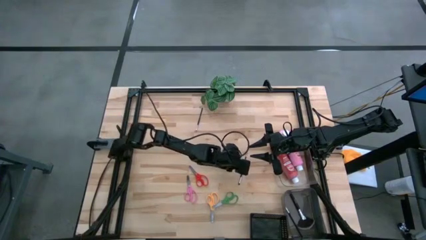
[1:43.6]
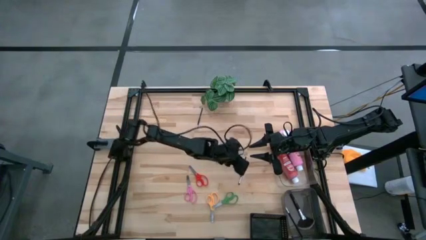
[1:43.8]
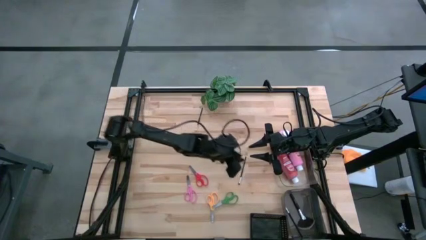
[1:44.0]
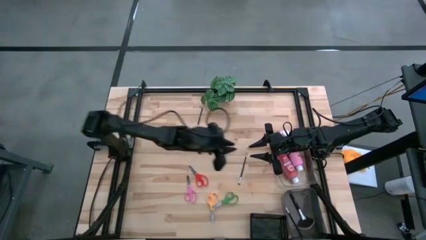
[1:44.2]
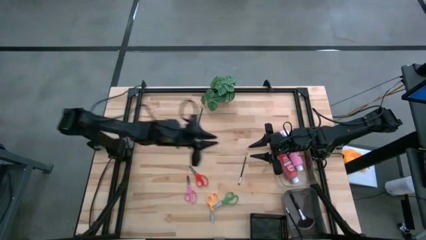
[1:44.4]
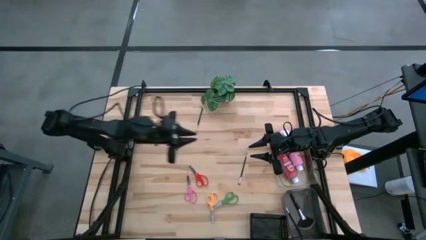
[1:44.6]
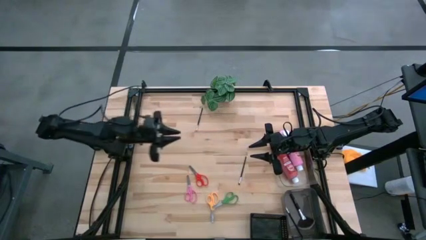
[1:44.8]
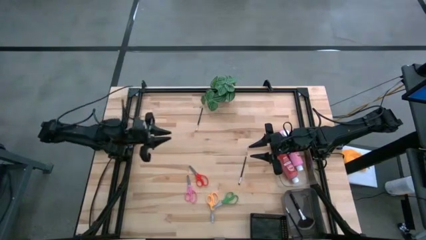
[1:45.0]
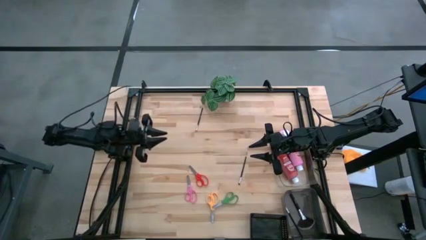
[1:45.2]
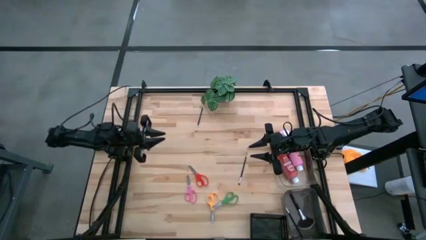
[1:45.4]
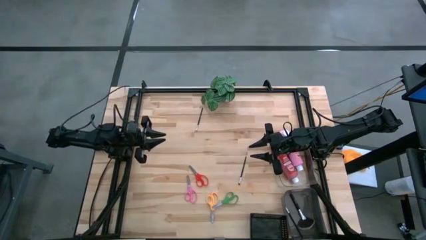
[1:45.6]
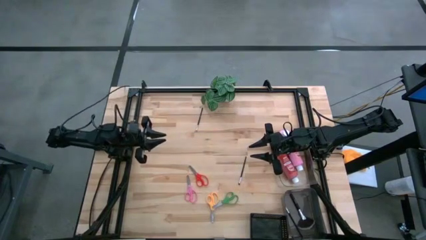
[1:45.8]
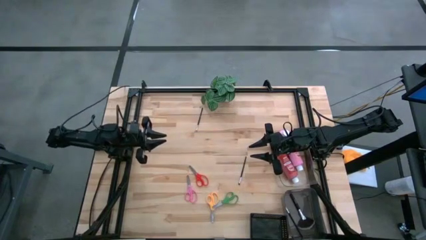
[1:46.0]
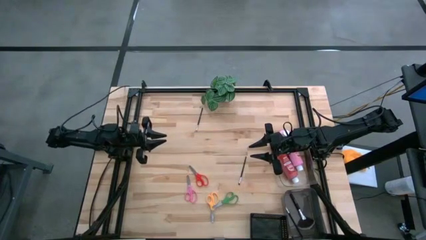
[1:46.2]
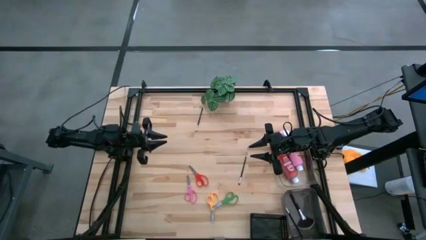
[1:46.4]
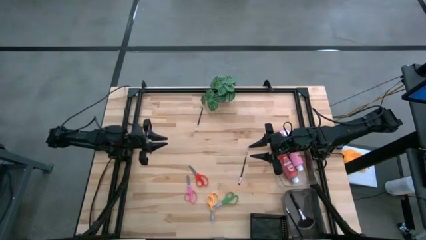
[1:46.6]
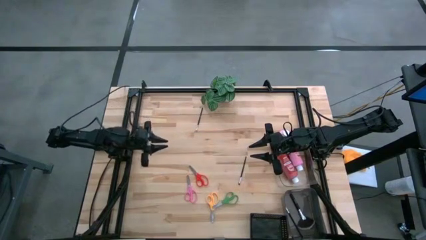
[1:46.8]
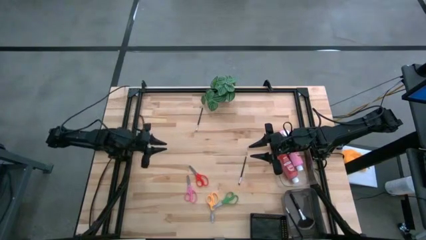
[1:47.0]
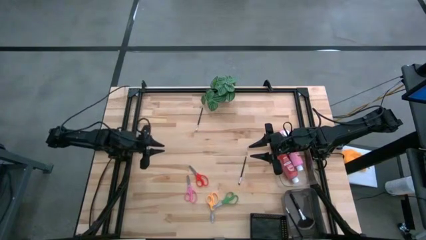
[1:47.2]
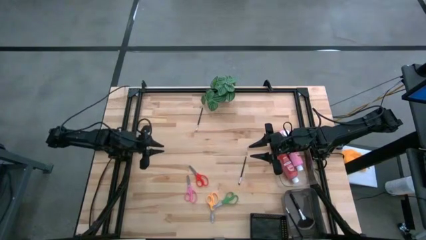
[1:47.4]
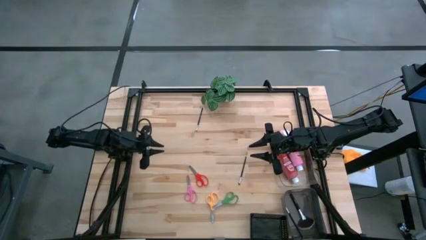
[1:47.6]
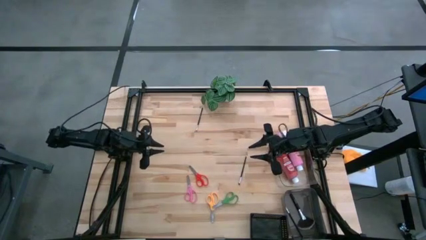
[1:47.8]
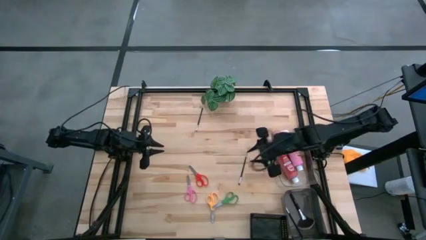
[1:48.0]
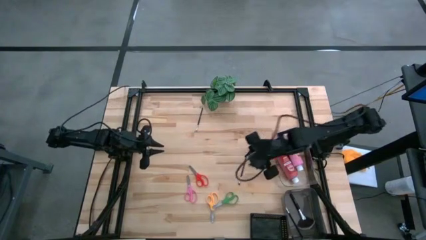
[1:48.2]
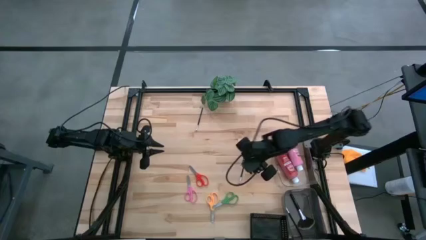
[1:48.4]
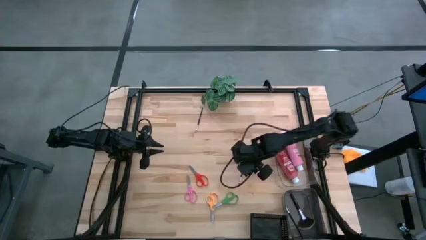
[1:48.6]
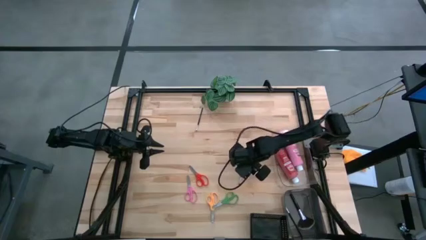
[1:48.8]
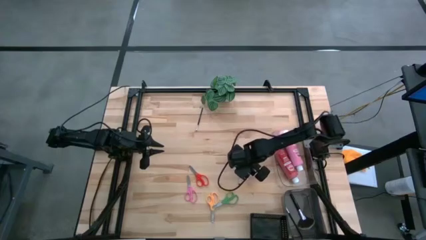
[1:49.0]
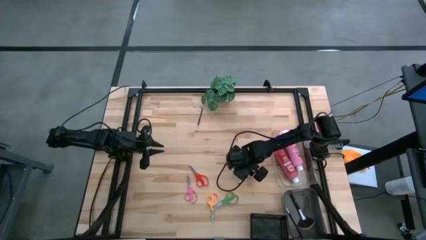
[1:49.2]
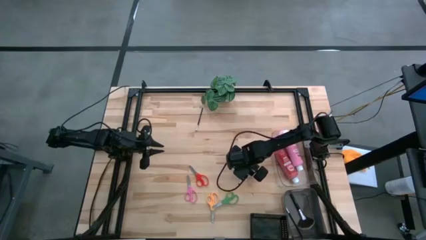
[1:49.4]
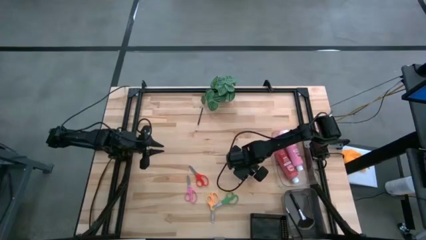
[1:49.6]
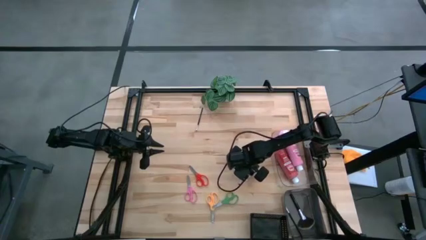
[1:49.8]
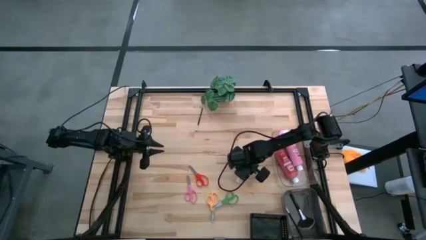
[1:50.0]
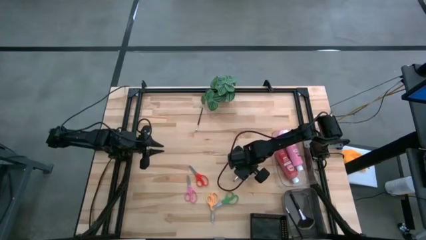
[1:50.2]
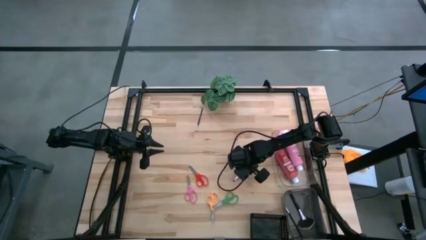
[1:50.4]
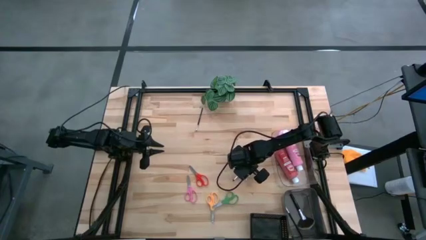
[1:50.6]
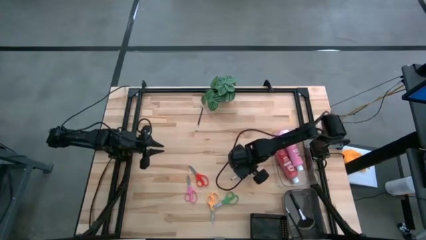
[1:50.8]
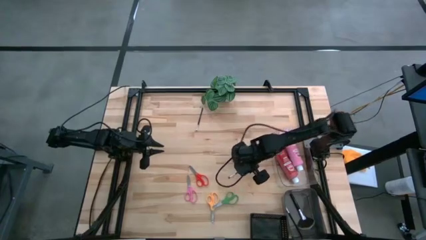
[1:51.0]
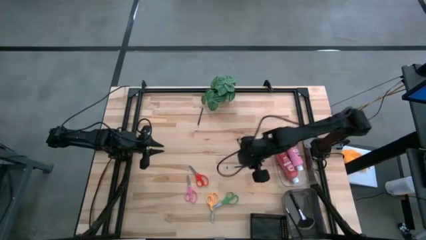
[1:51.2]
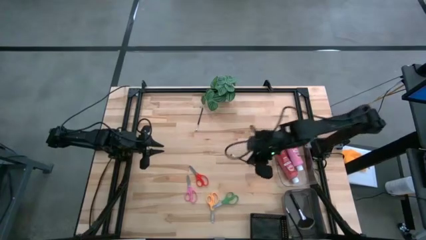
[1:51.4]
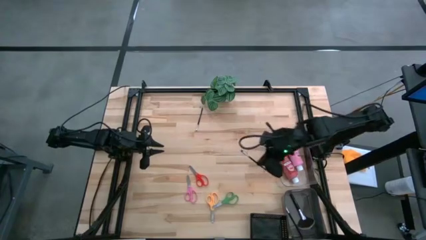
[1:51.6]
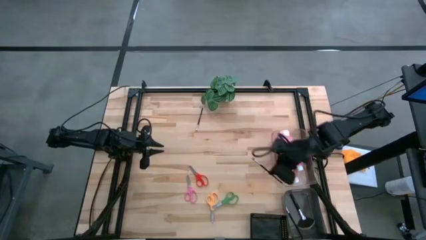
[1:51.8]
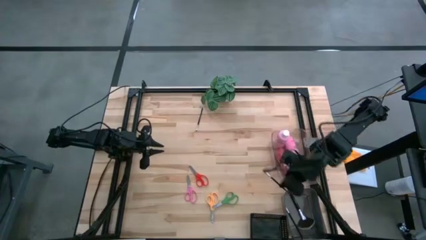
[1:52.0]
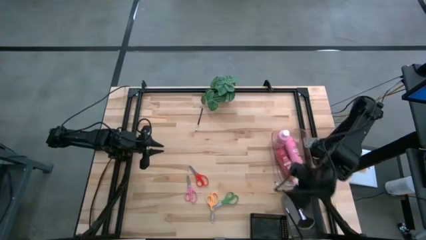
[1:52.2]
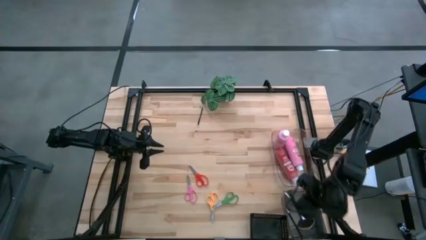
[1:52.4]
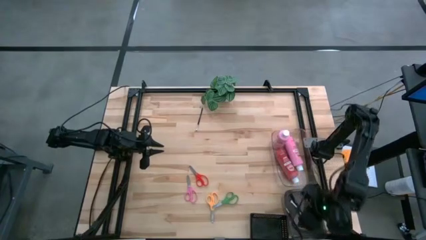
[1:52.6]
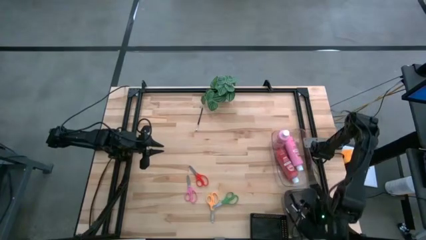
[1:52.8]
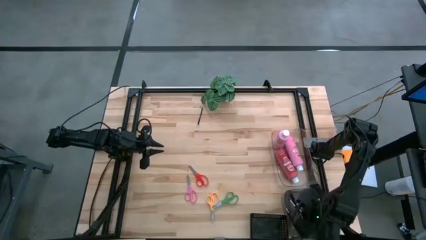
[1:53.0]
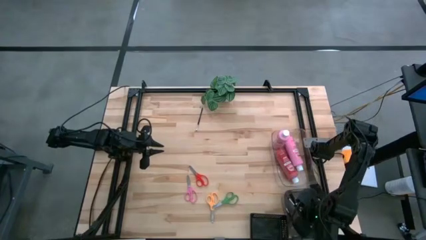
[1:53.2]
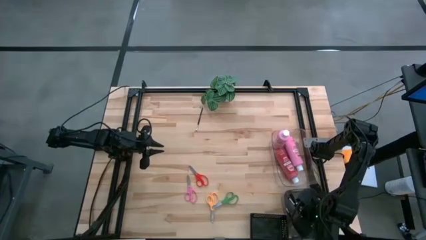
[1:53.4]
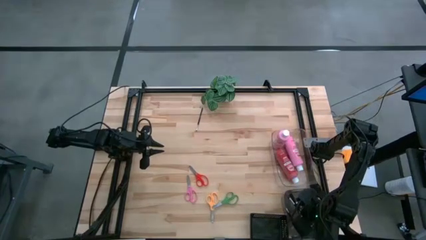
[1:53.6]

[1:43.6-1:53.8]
Task: Pick & Place Paint Supplies
Put the black paint brush into the gray bin
